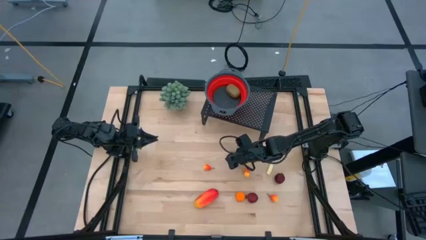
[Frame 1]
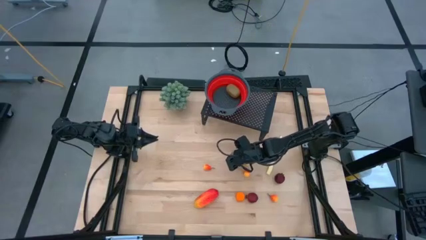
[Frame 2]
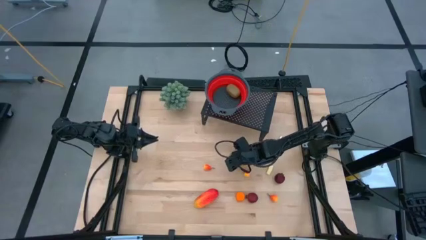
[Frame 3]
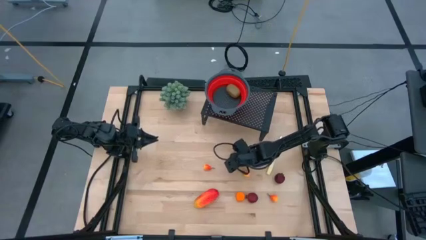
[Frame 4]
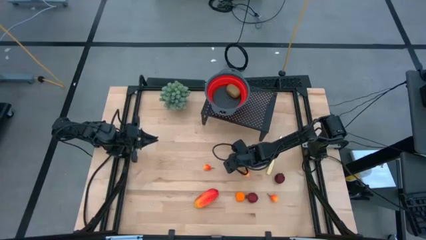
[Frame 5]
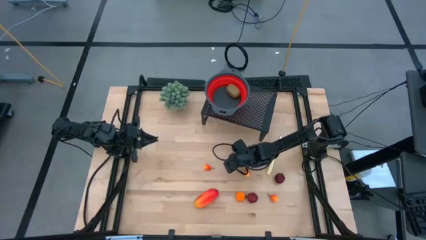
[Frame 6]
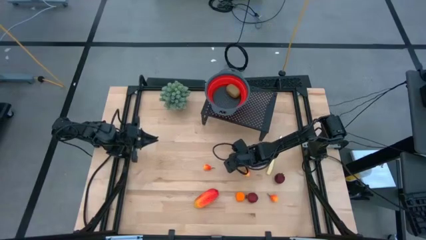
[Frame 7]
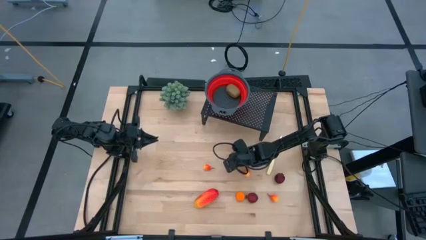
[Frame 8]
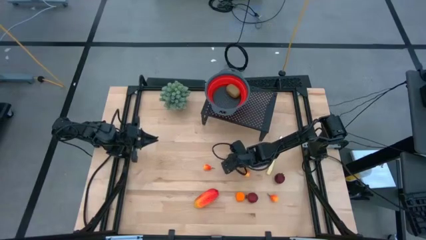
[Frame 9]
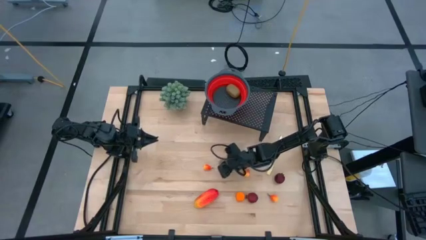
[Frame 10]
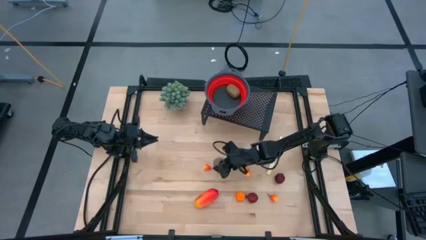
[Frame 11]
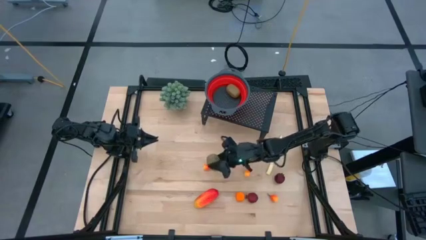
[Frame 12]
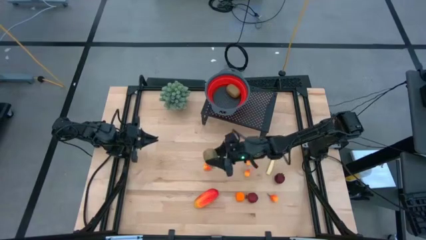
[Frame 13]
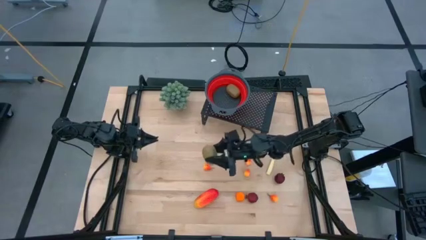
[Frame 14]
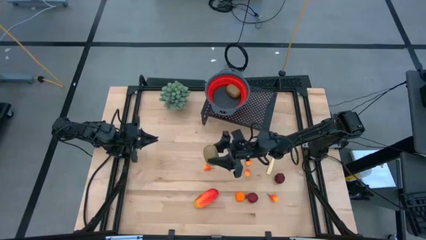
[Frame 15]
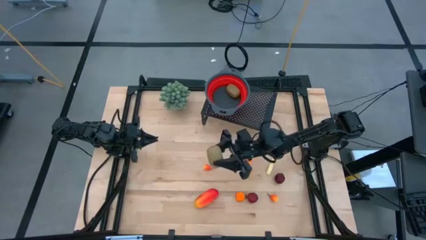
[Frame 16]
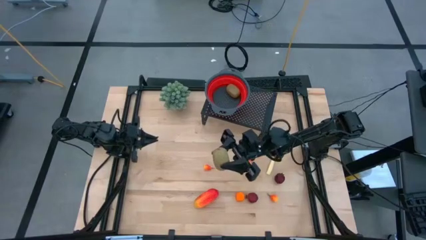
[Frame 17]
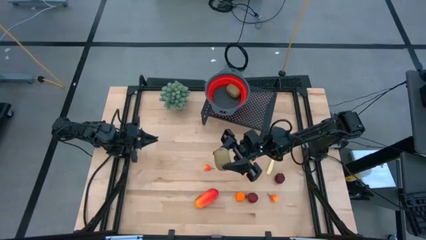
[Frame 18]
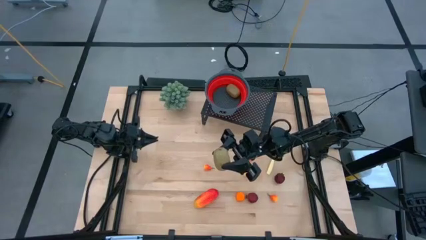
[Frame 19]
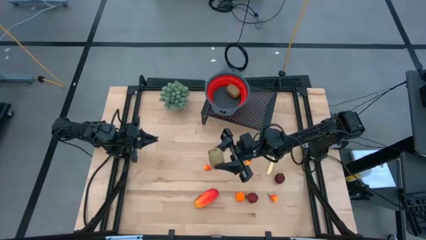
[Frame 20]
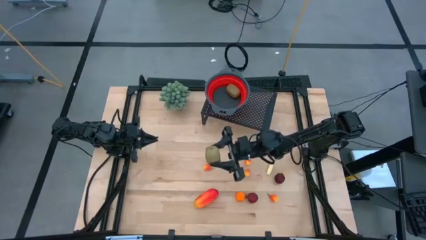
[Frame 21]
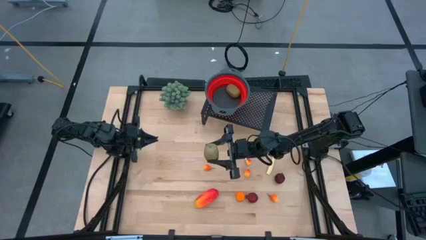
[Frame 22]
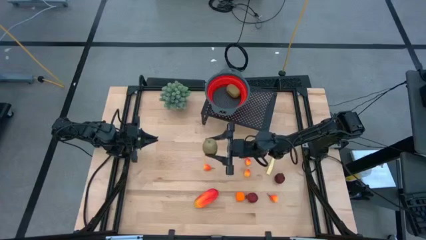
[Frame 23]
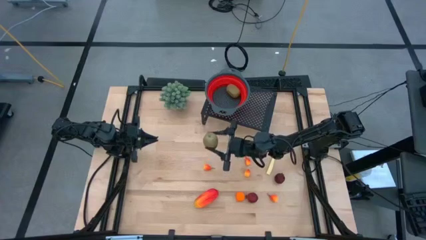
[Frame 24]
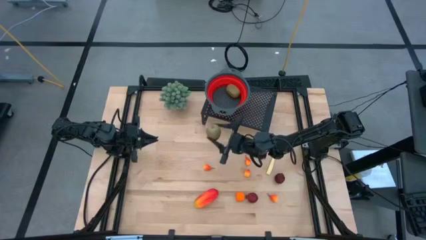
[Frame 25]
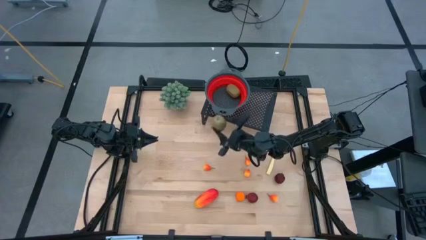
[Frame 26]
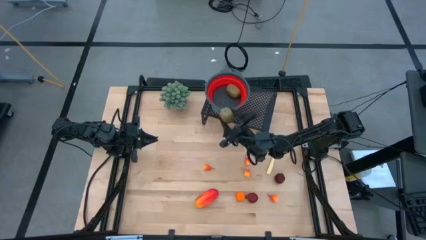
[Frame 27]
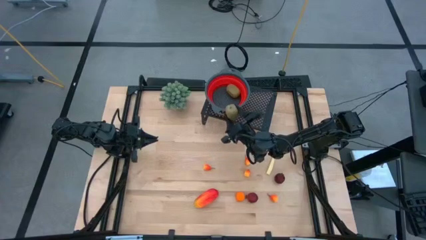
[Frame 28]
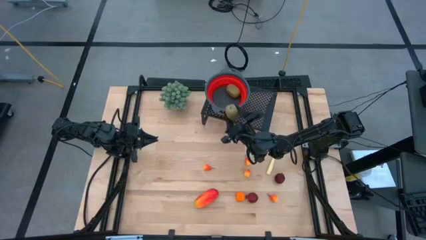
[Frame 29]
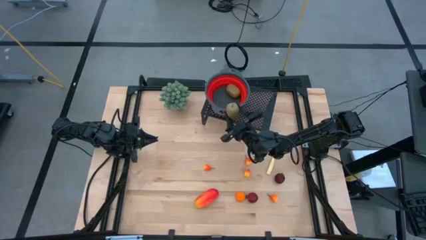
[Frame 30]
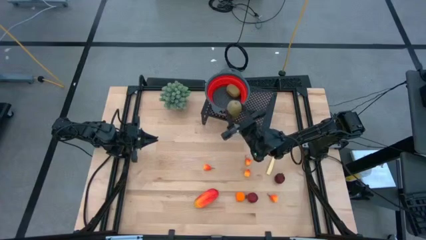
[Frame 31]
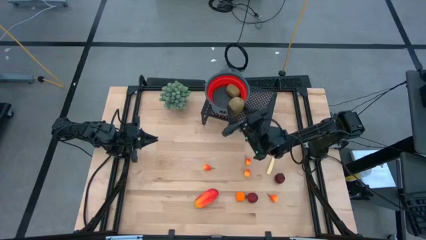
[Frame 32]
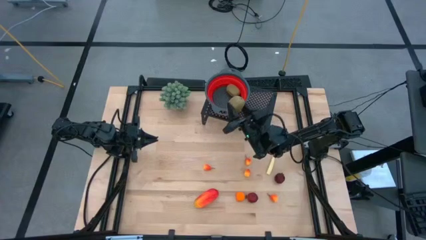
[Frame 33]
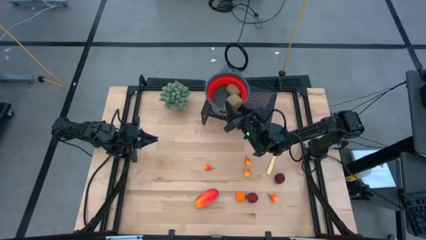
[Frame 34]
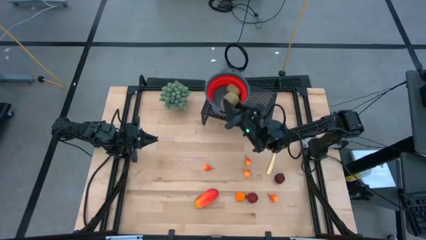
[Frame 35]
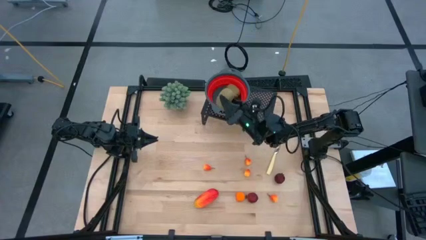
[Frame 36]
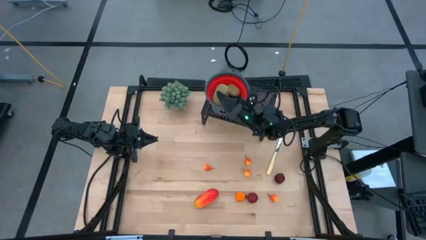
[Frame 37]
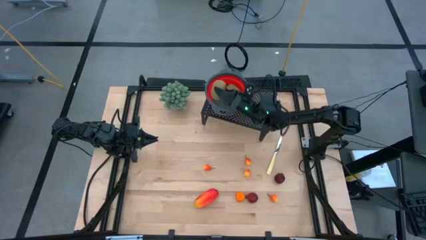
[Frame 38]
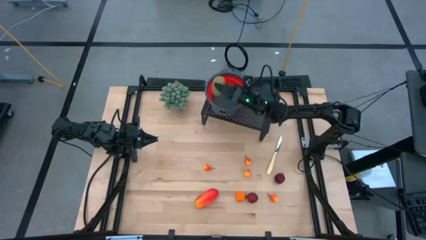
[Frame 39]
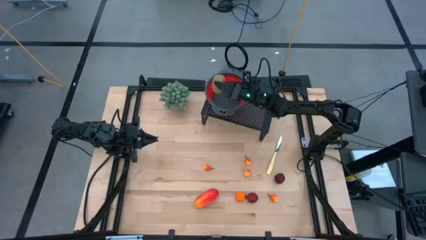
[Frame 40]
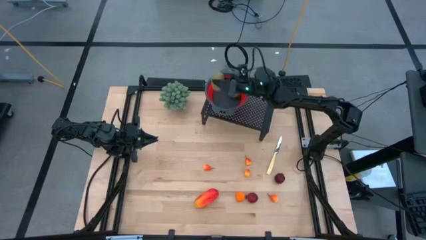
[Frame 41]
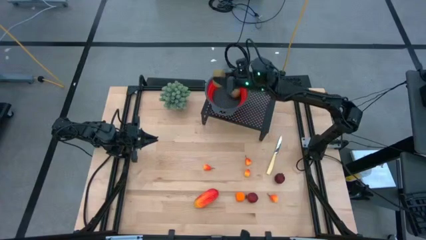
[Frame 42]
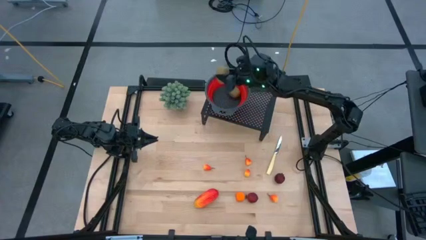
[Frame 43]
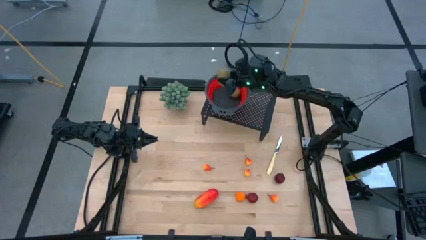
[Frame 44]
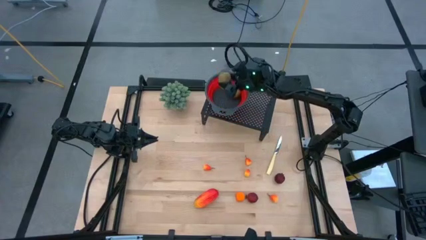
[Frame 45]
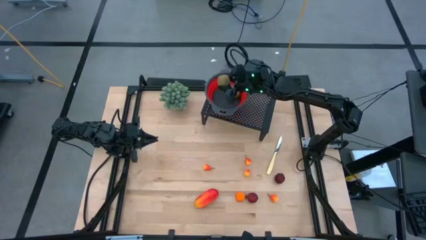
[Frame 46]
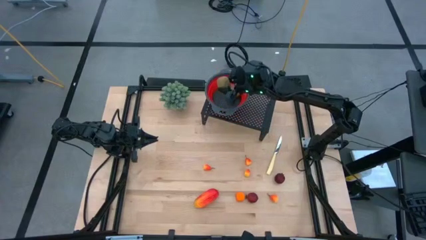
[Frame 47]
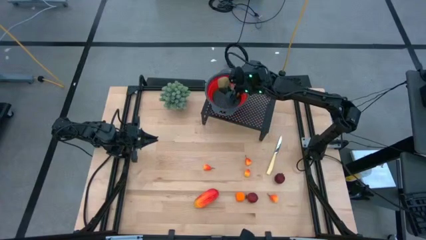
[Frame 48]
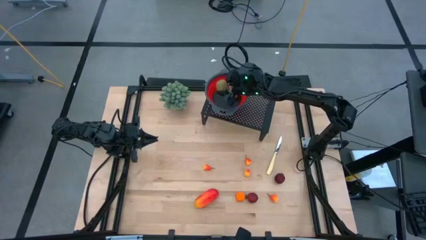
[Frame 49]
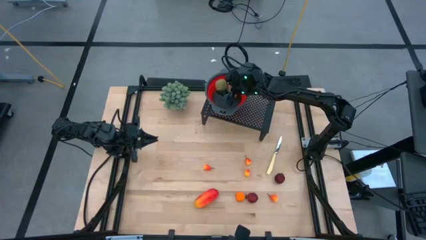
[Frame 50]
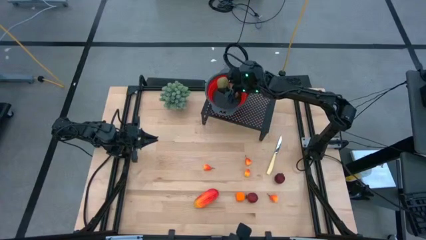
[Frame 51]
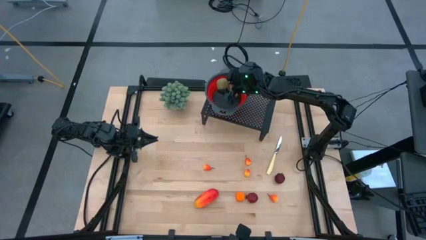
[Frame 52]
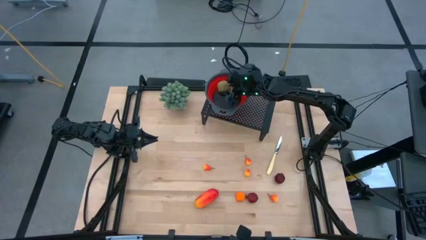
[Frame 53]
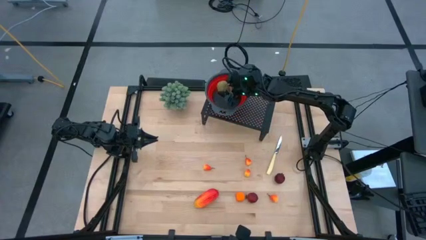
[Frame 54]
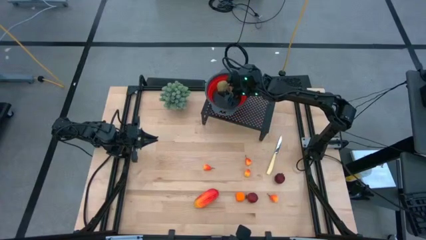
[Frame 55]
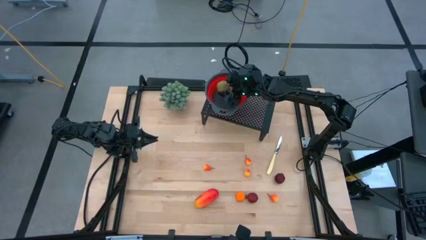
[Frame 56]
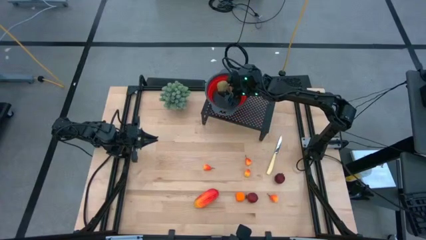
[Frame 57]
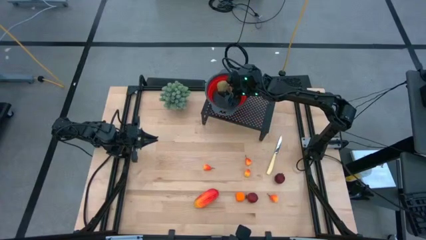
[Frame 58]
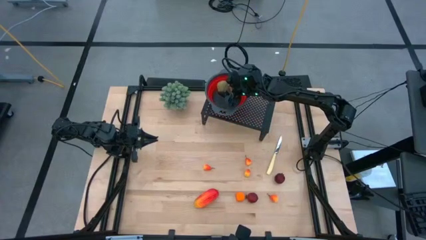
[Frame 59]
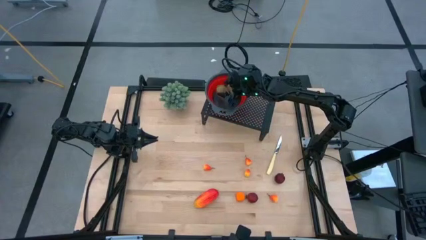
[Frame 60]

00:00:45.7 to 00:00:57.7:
Task: Pick & Place Fruit
Put the kiwi into the red strainer bowl
